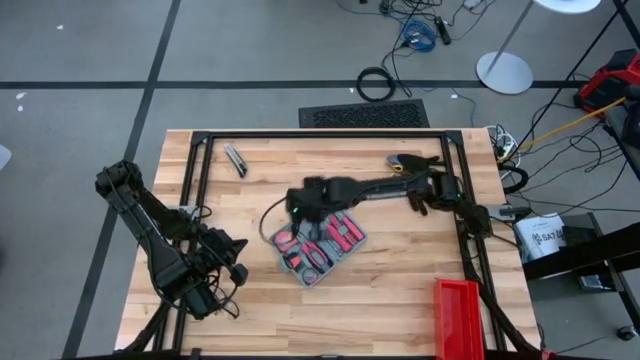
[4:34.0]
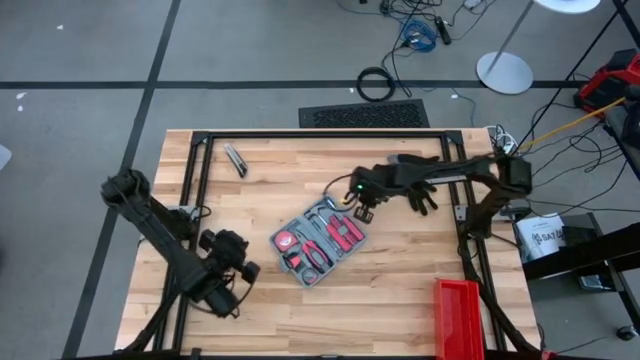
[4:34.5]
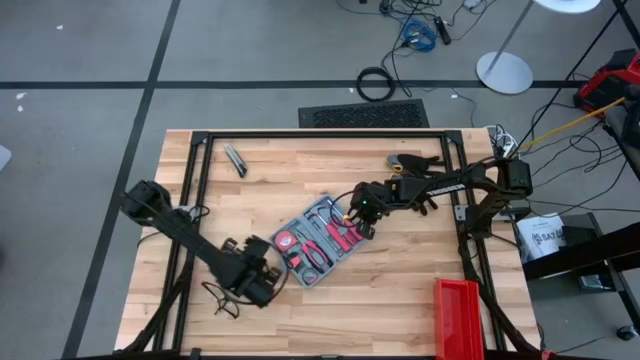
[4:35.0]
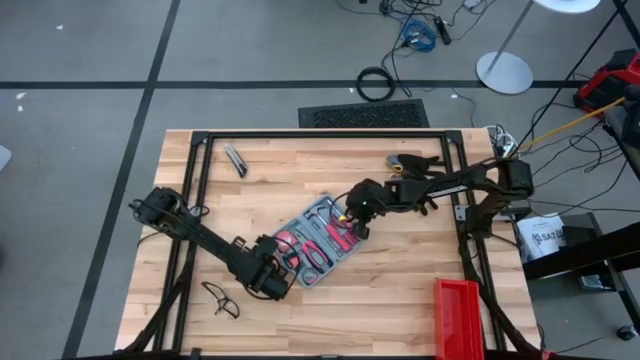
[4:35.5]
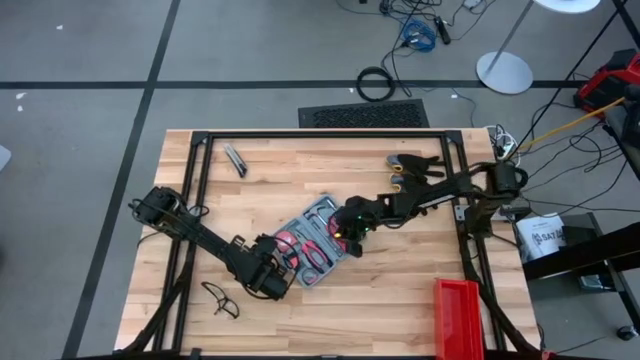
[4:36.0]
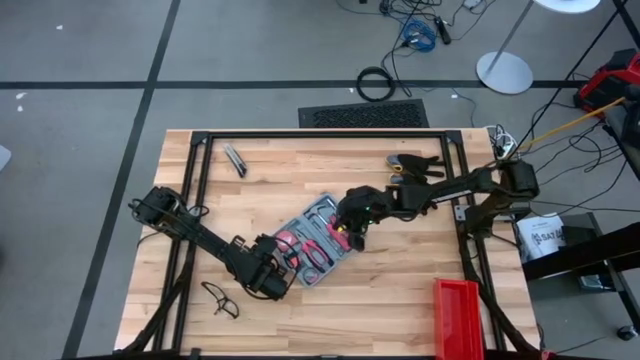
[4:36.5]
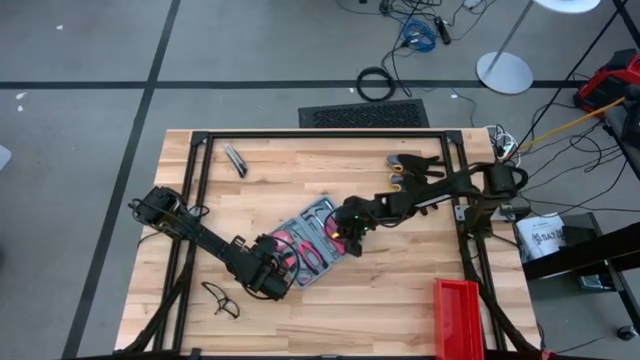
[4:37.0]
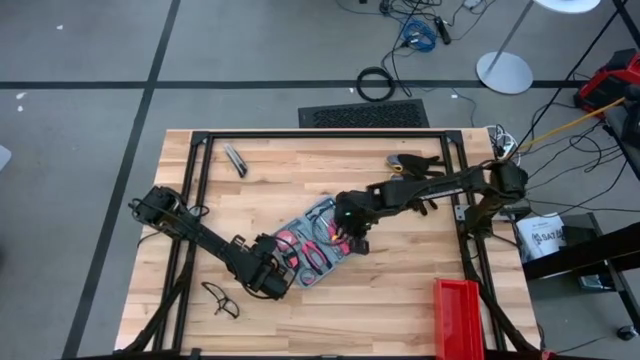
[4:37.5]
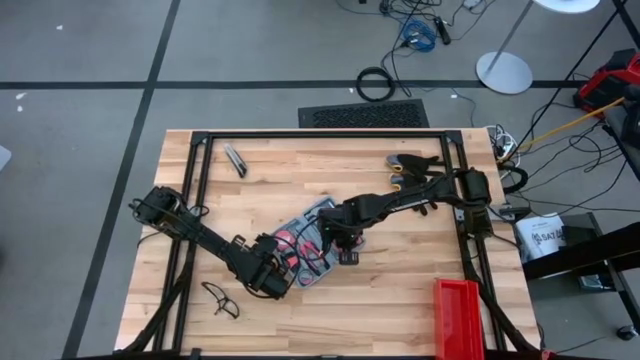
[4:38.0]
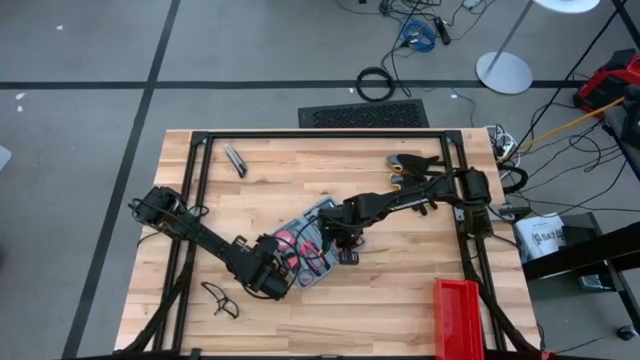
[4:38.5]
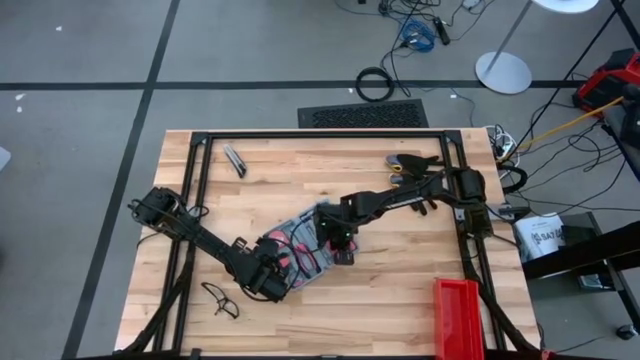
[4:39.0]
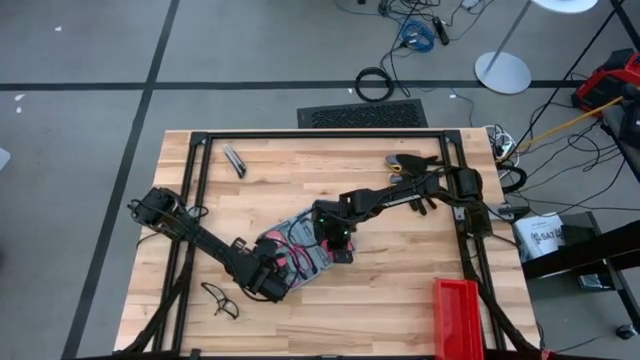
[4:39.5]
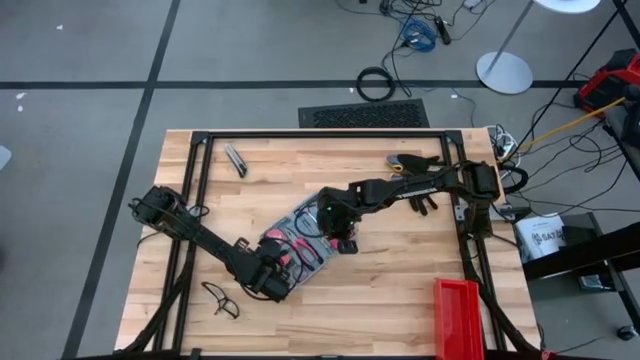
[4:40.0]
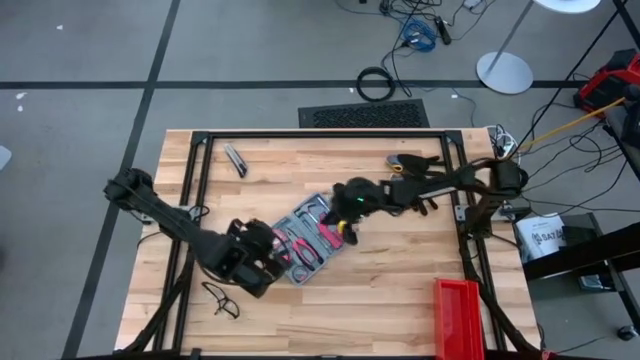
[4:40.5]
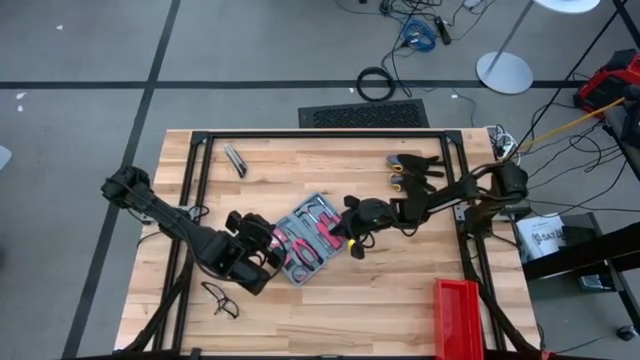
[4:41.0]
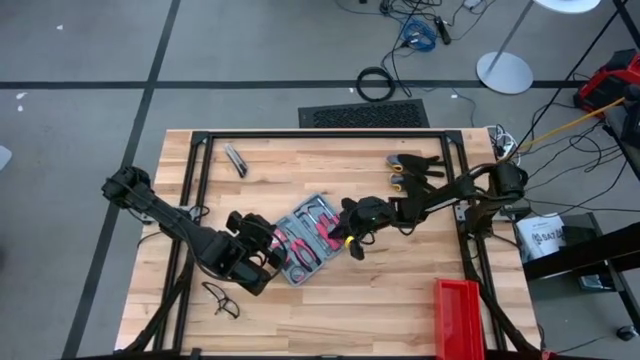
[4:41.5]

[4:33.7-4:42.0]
Task: prefit tool cases
Adjust the tools from the gray prefit tool case

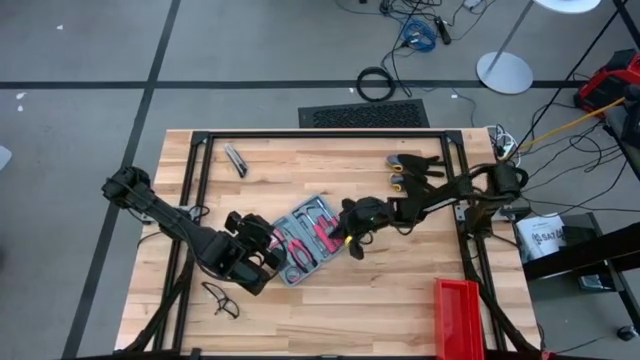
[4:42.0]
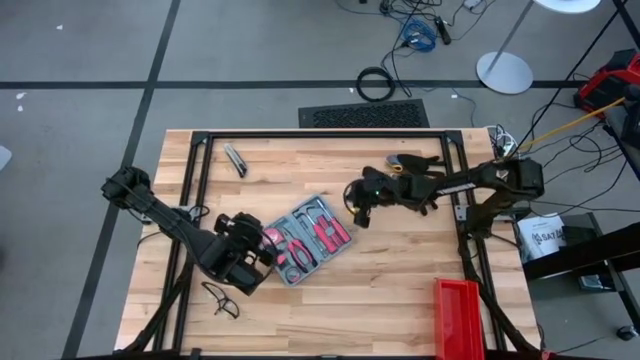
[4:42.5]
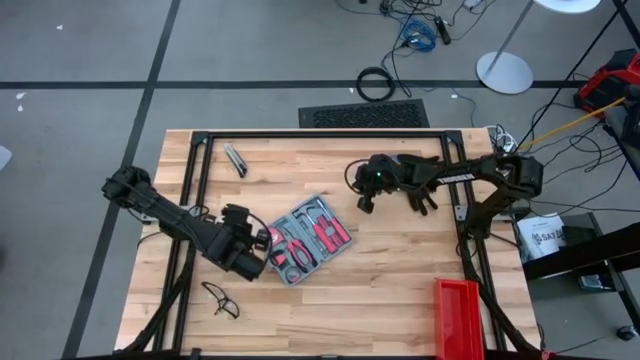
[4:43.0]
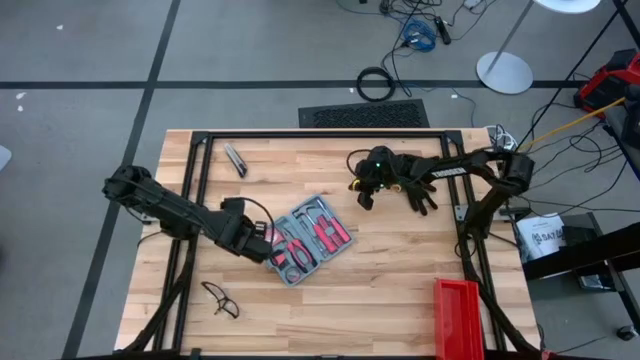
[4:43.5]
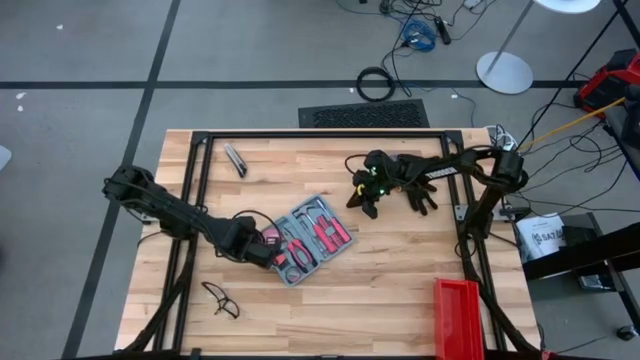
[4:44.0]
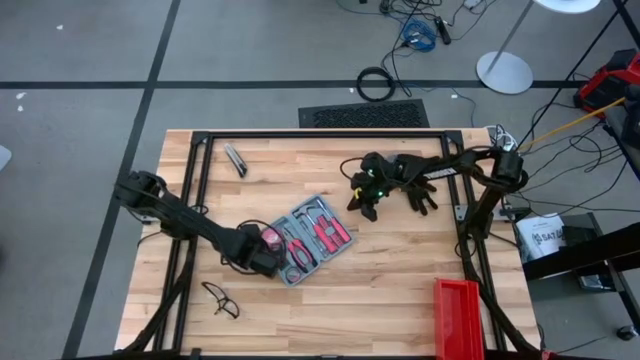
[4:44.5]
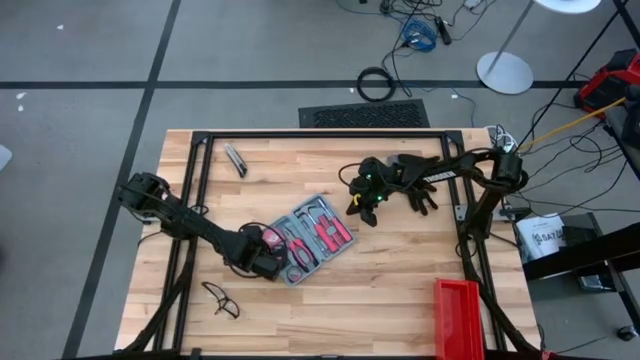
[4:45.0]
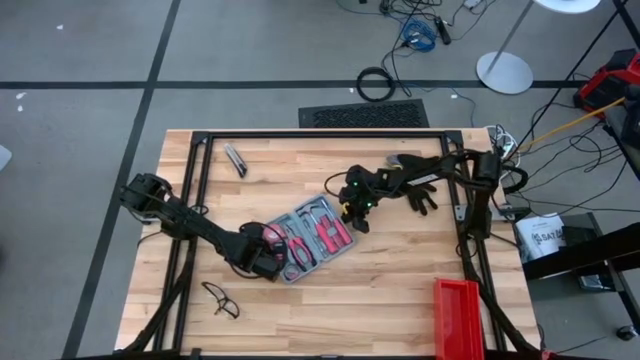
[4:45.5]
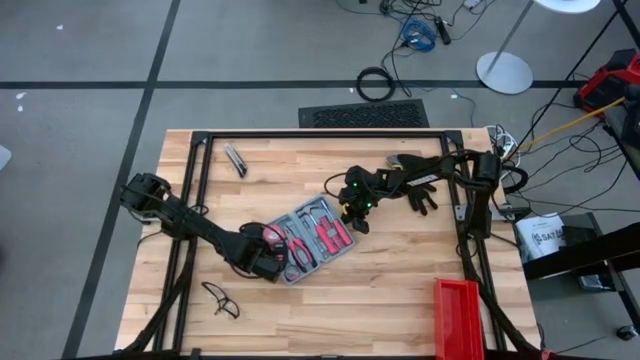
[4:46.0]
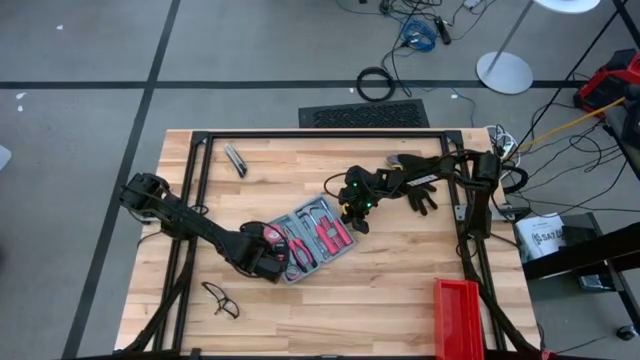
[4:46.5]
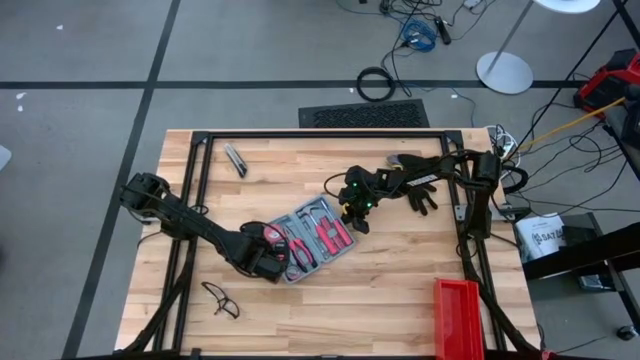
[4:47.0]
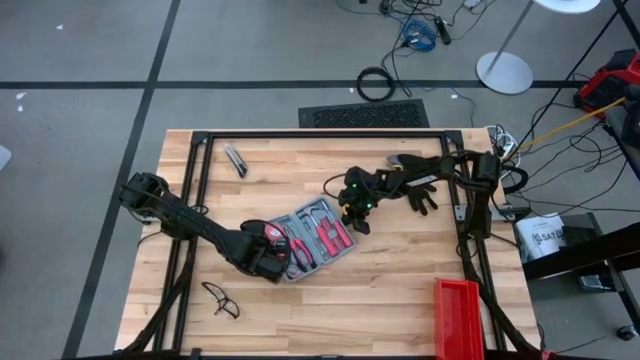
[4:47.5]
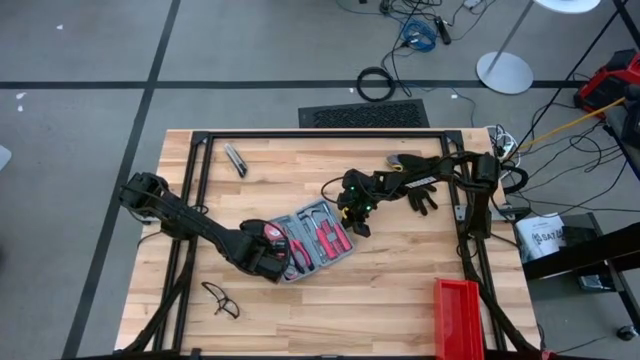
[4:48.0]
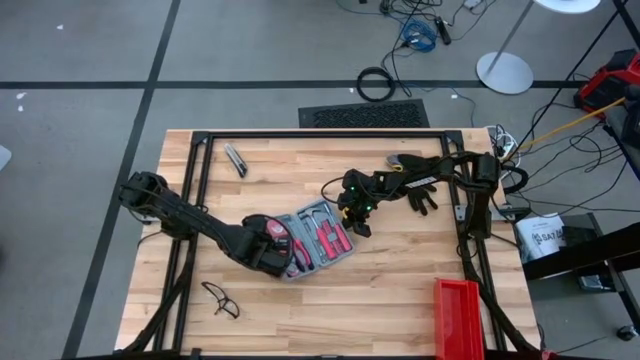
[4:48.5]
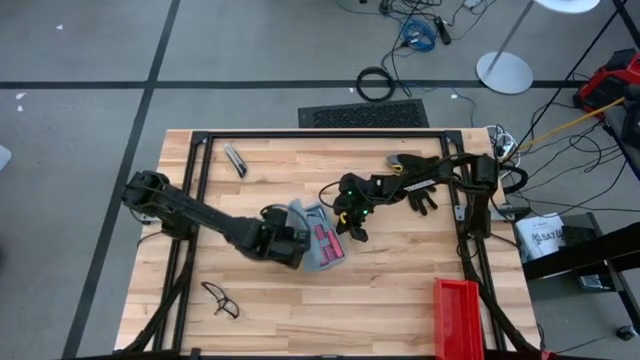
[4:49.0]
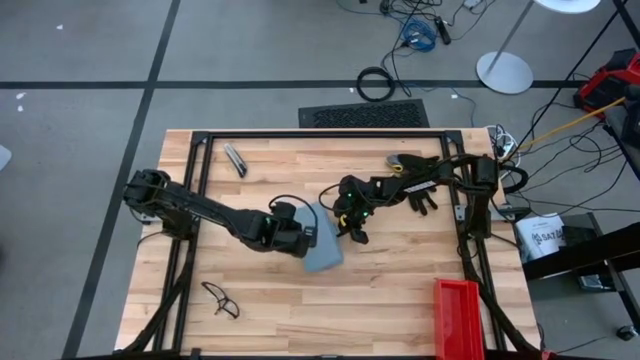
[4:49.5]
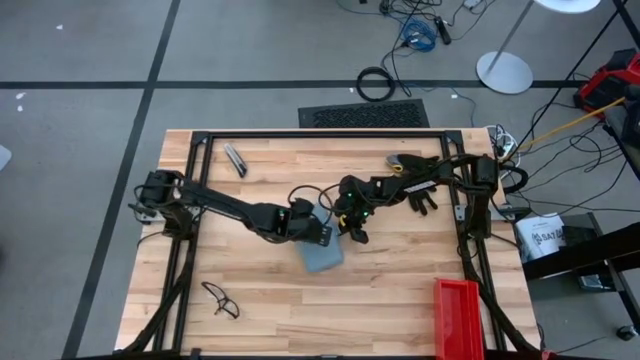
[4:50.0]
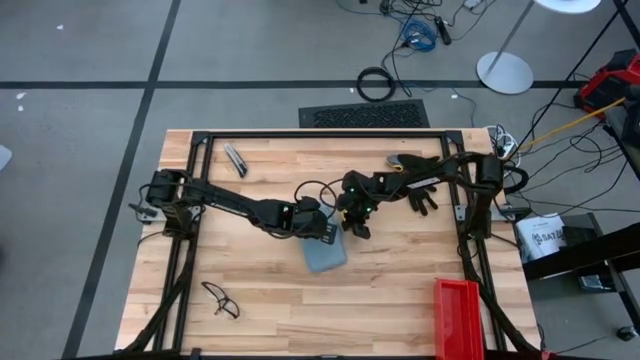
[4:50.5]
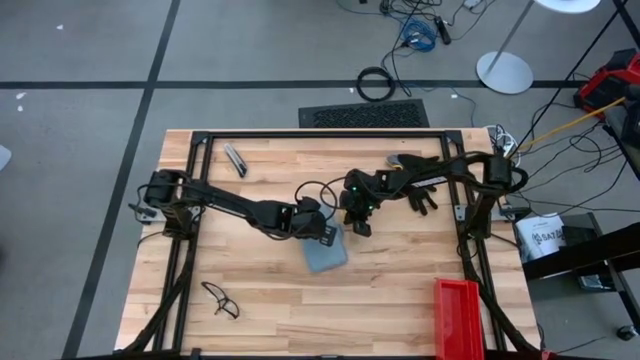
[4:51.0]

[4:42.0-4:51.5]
Close the gray prefit tool case
